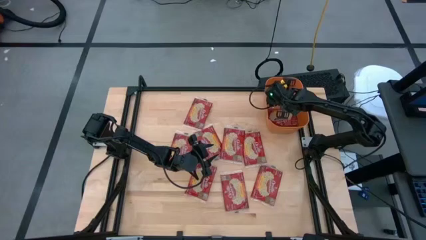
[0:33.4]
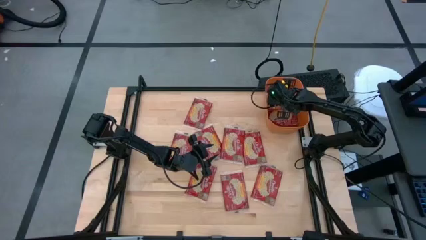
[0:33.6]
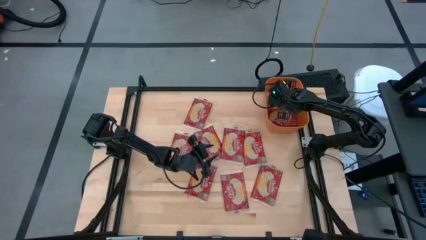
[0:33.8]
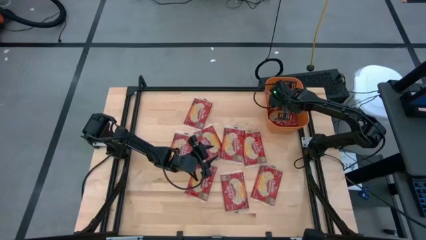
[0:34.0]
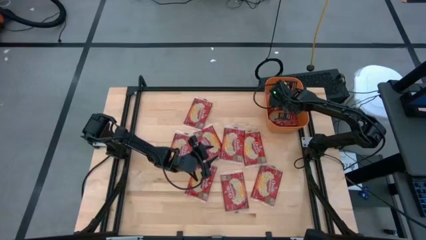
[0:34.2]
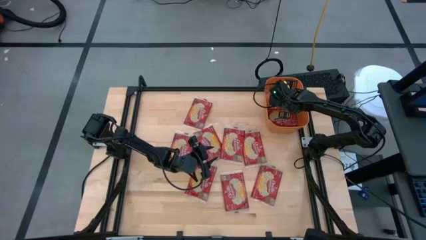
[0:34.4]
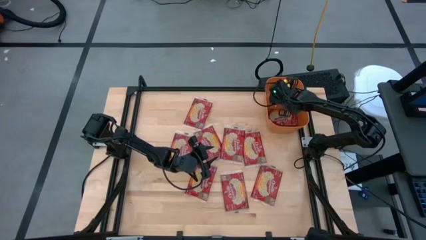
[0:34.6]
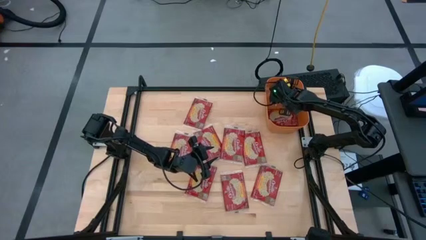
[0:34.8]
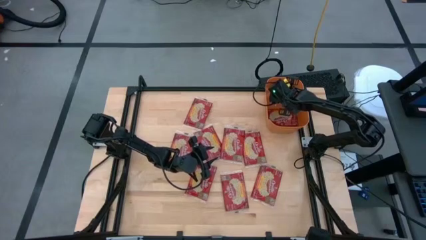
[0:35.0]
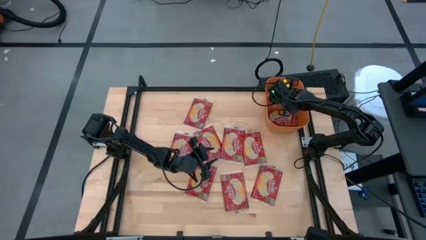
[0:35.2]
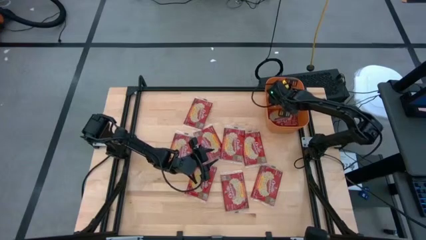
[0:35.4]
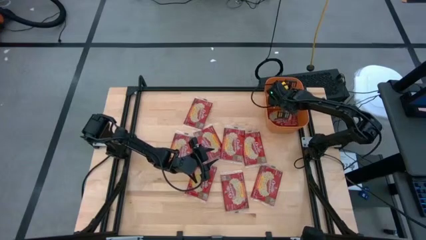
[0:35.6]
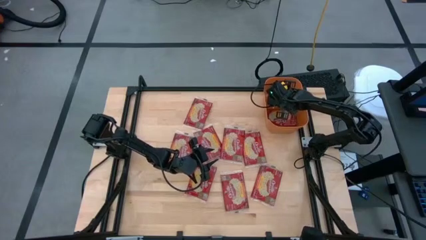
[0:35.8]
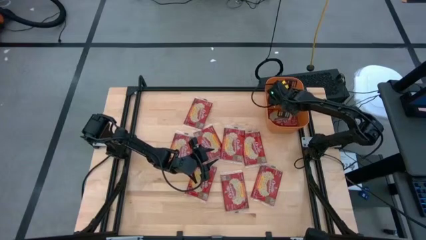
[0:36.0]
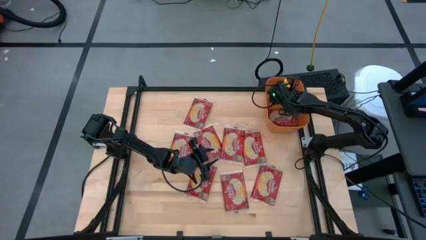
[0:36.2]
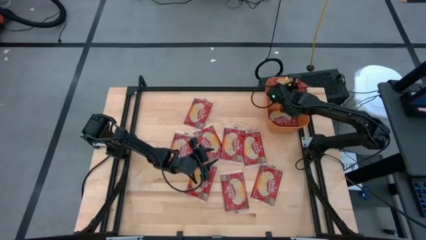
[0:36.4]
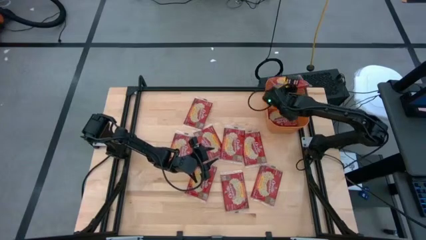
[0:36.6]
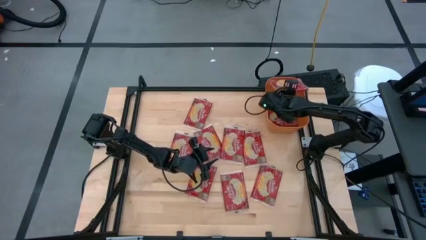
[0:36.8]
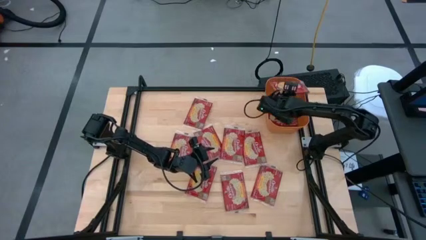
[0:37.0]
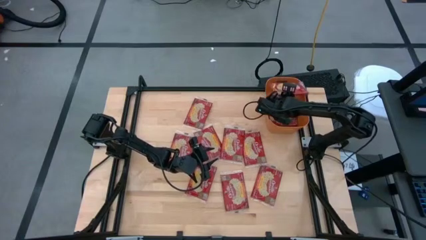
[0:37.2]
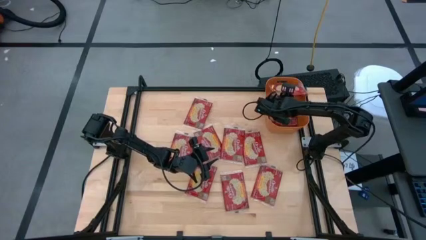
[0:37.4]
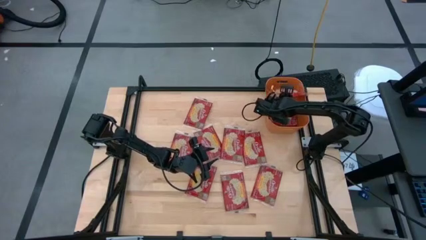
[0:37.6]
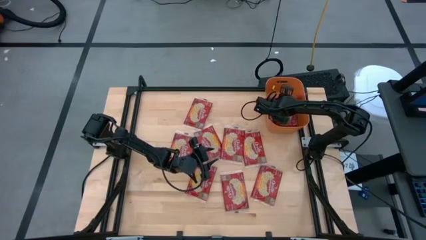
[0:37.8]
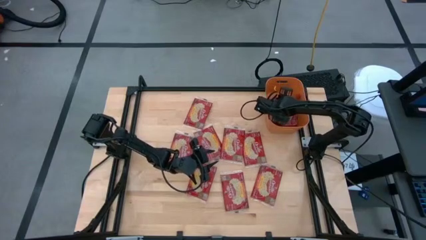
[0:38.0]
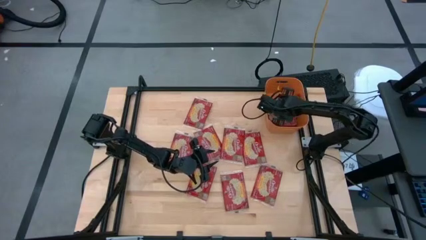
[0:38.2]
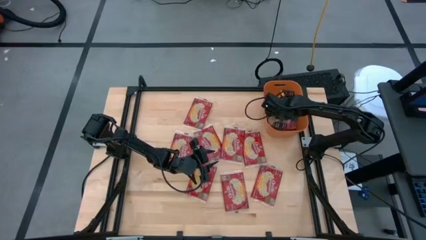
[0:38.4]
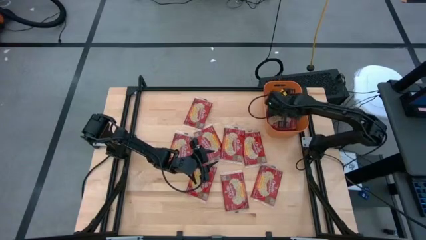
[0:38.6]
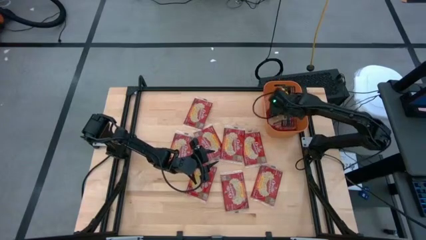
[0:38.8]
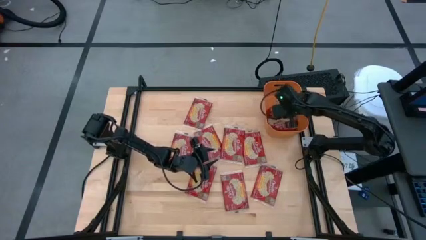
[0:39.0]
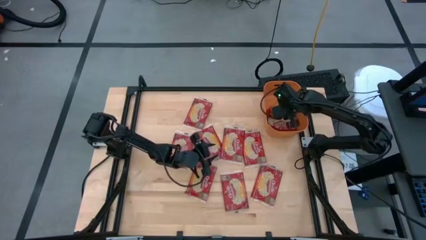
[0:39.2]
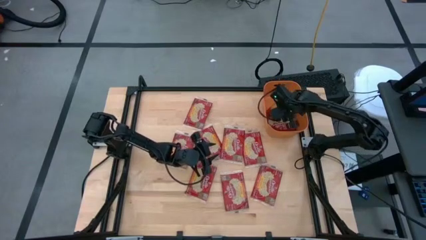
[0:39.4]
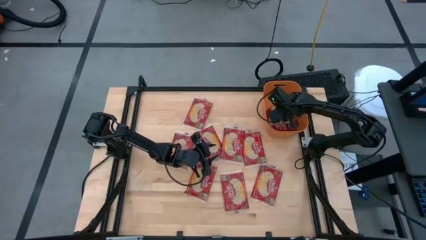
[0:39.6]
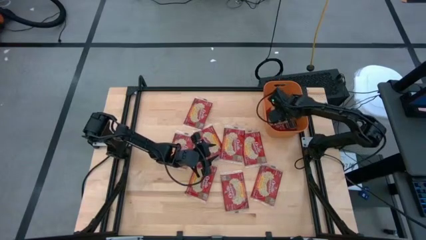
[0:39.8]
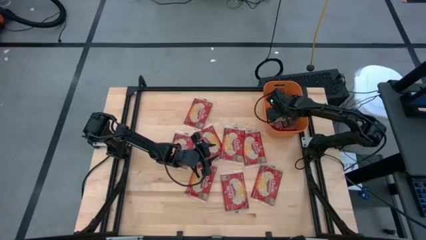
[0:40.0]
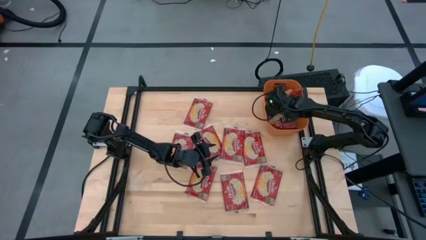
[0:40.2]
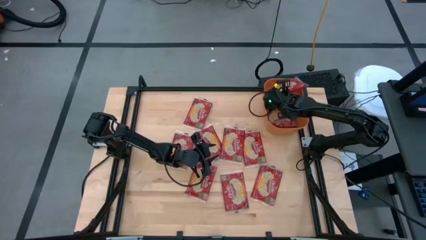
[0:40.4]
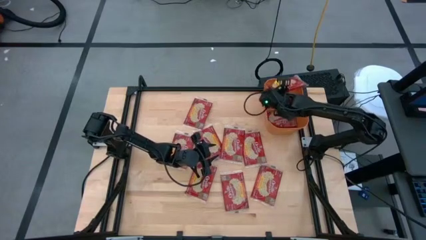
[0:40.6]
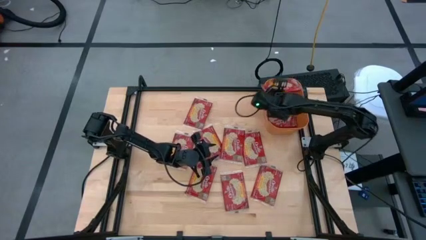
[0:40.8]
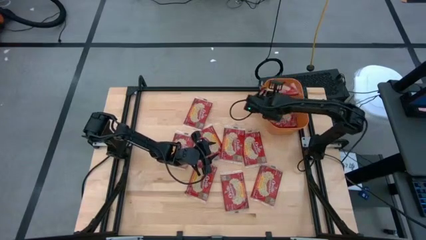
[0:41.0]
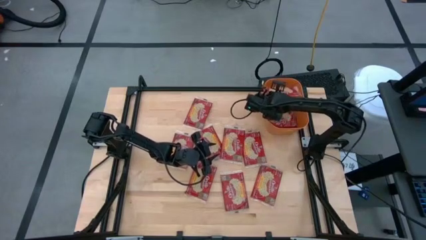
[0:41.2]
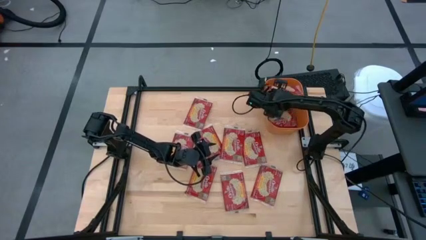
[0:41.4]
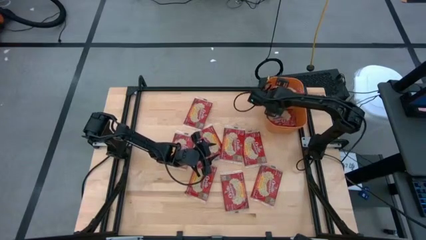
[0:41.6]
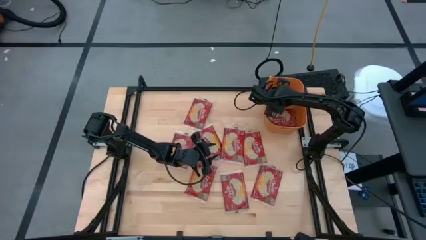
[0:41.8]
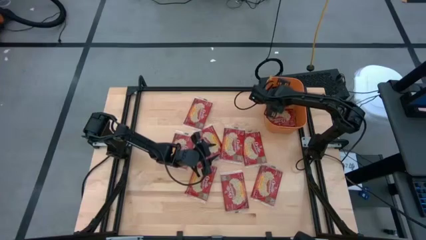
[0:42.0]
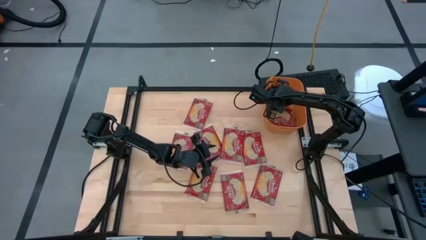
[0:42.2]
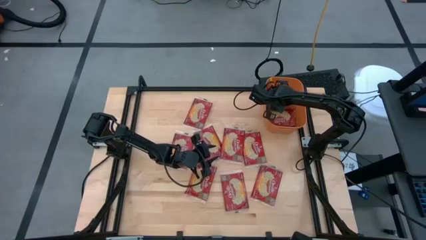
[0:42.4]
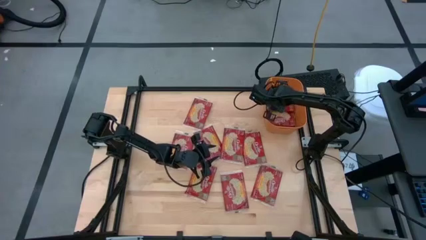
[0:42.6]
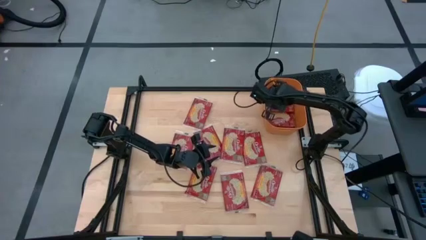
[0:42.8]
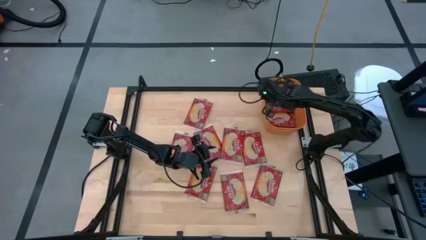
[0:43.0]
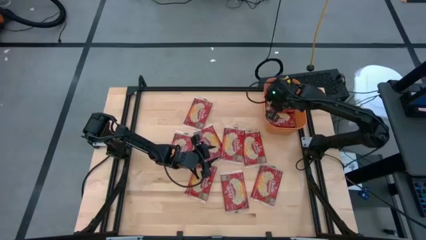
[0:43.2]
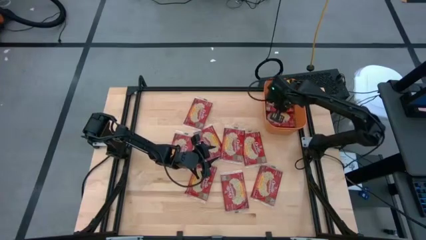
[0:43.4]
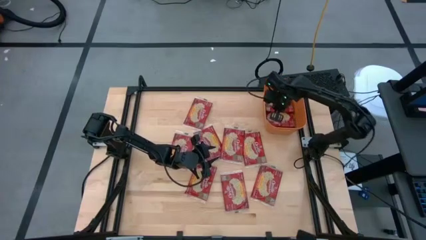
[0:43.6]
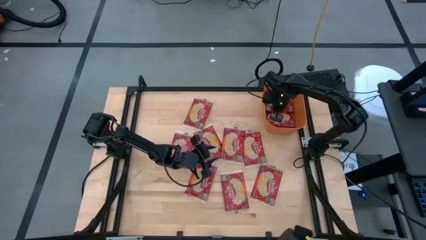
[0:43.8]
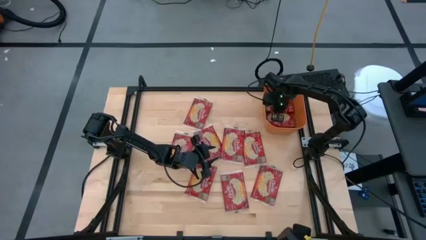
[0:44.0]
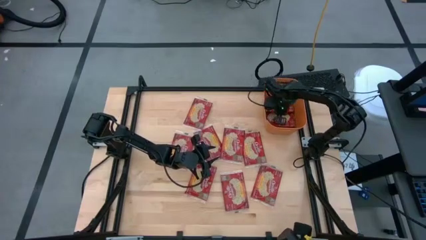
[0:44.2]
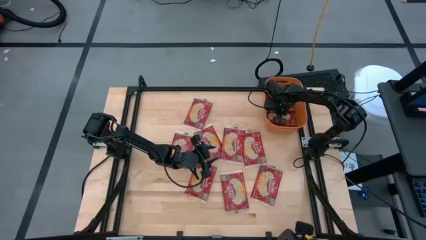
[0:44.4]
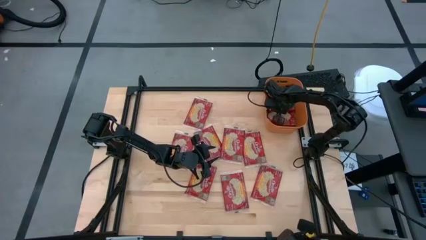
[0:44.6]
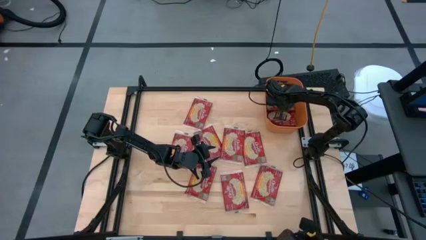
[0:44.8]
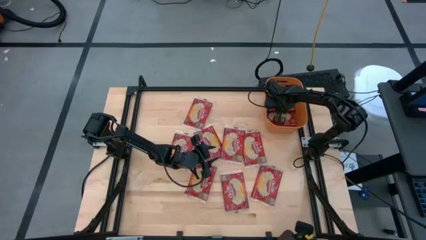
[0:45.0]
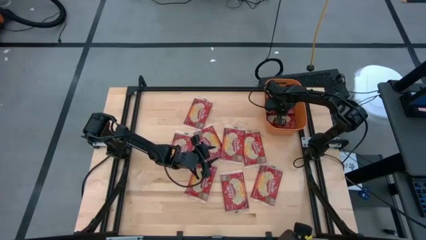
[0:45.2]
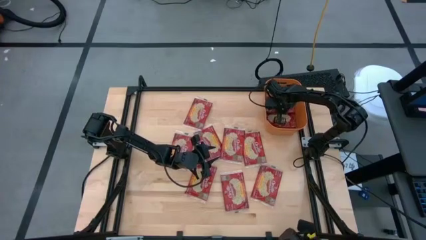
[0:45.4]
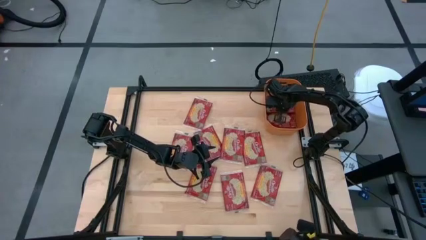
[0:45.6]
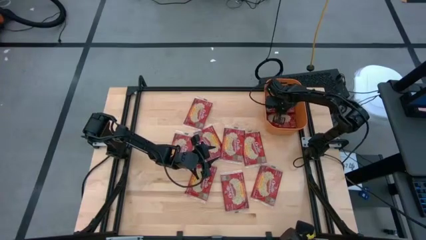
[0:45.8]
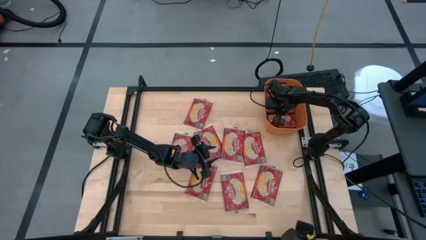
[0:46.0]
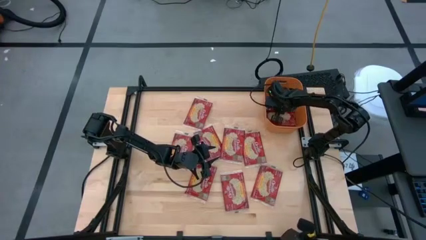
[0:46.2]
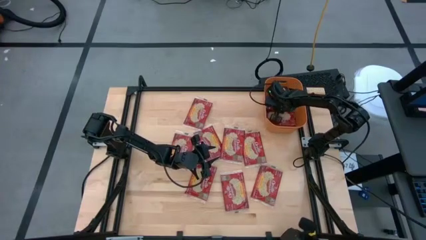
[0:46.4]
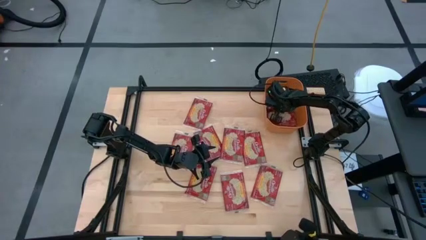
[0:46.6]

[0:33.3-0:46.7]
Task: Sort popcorn bags into baskets
Put the red popcorn bag into the orange container
